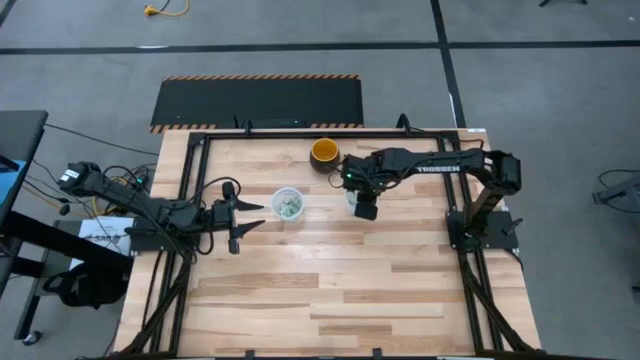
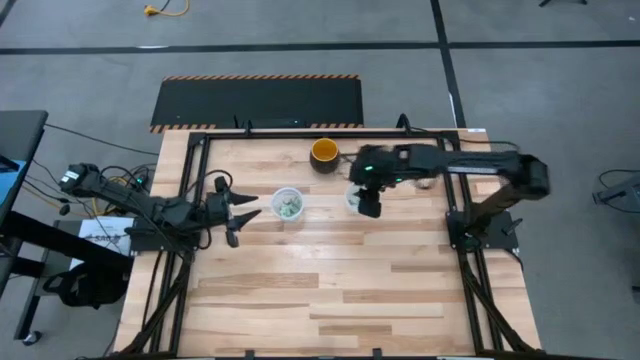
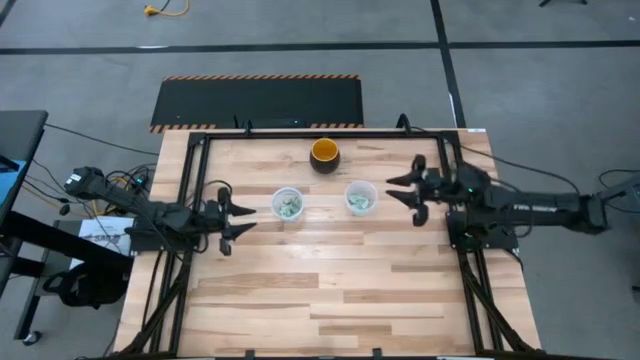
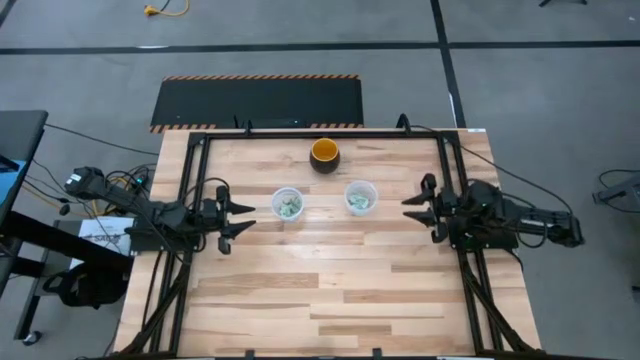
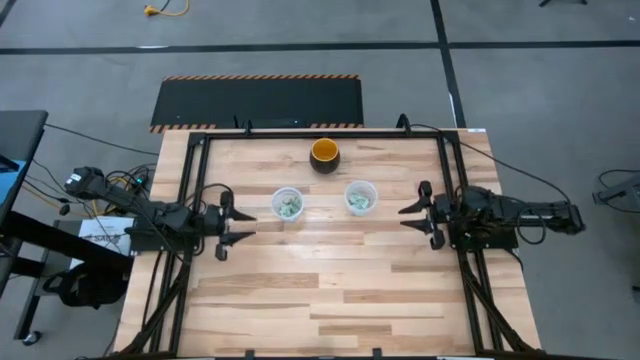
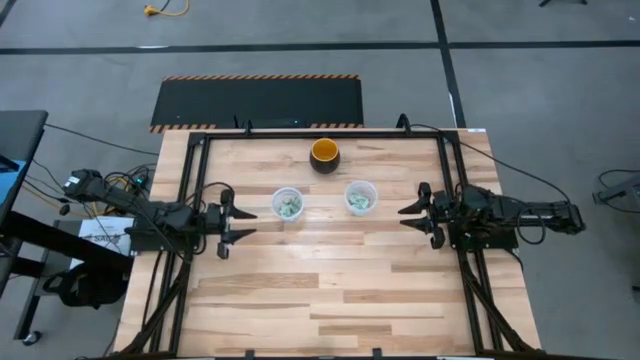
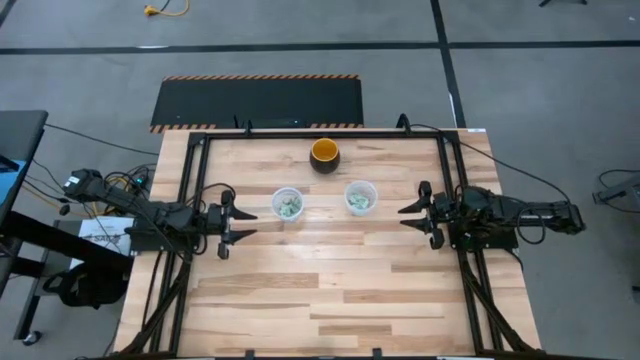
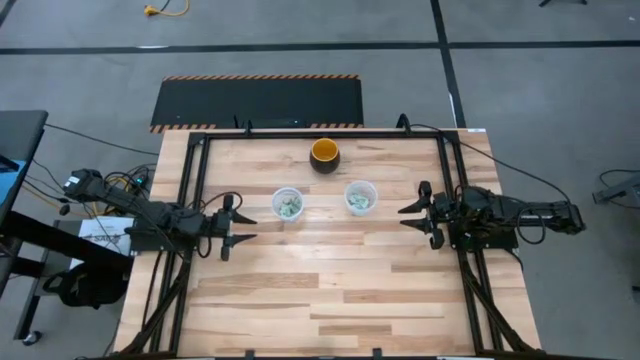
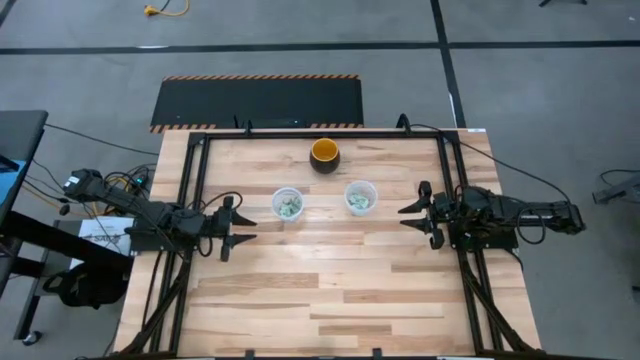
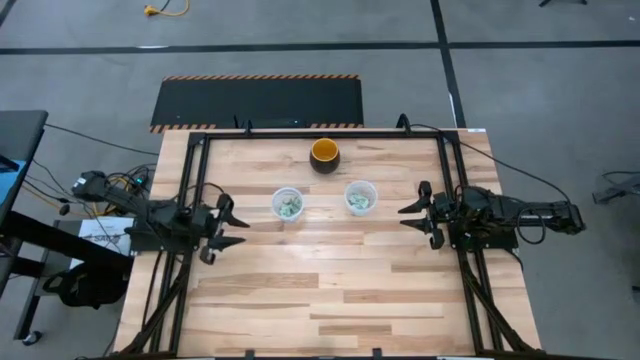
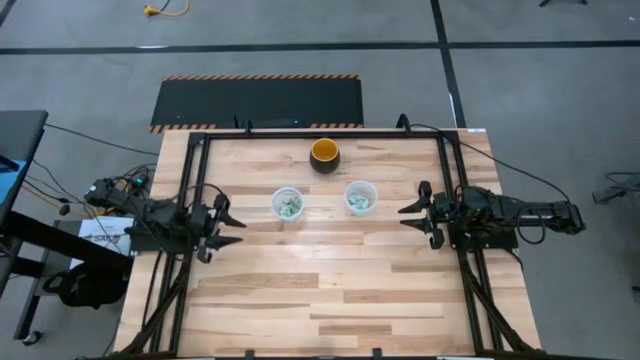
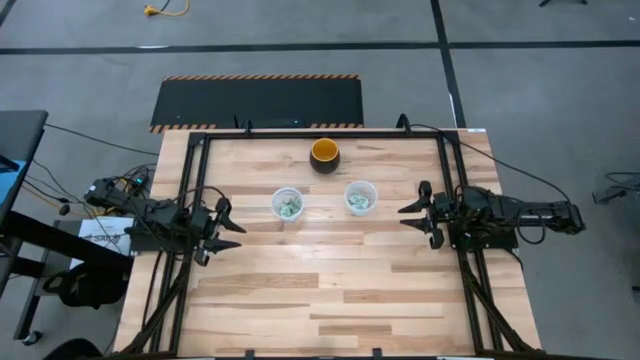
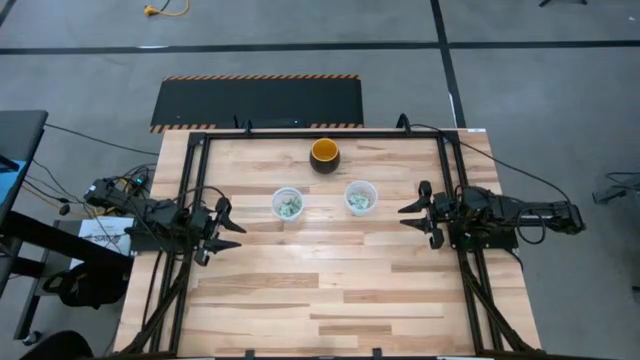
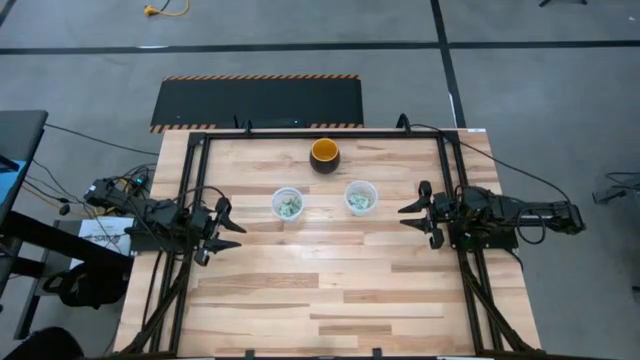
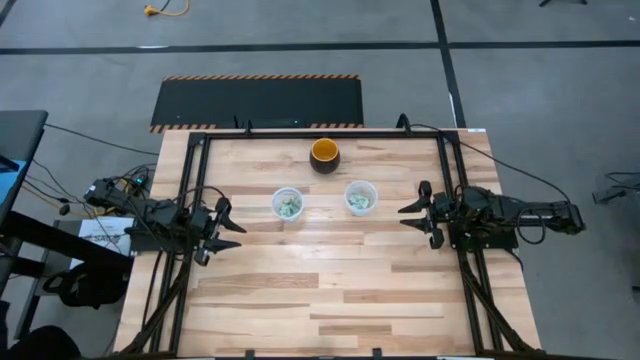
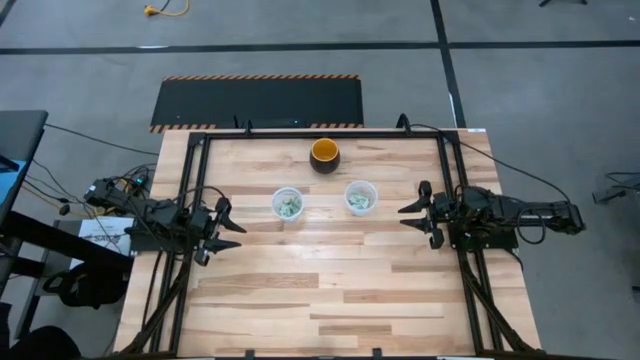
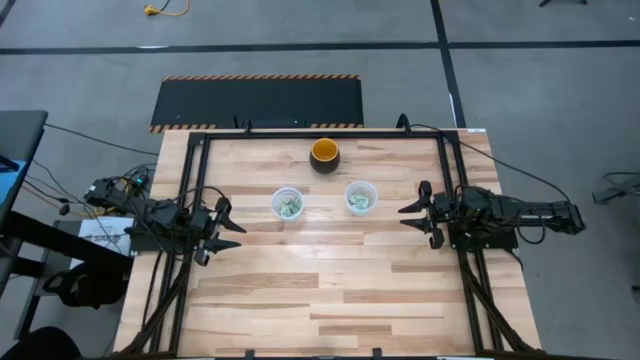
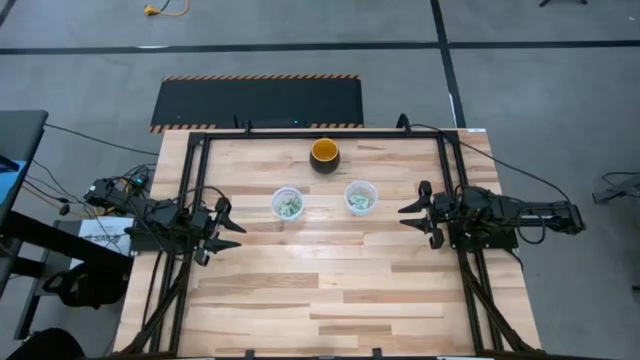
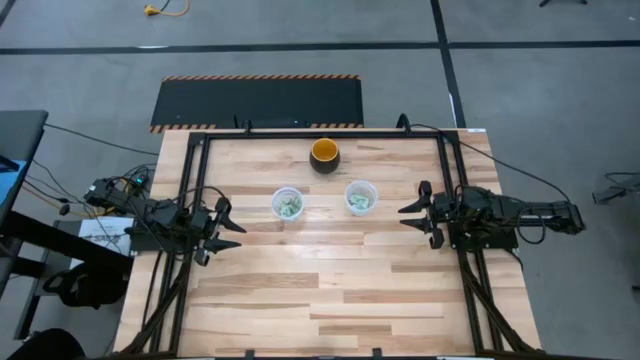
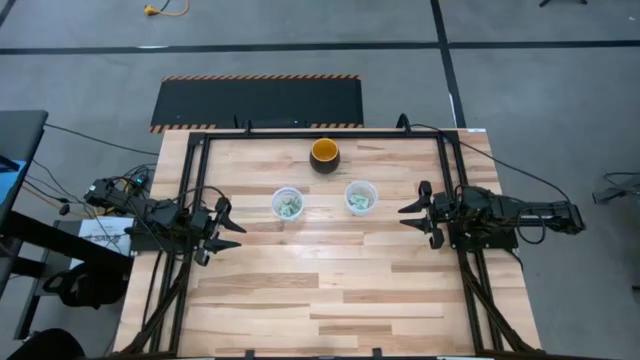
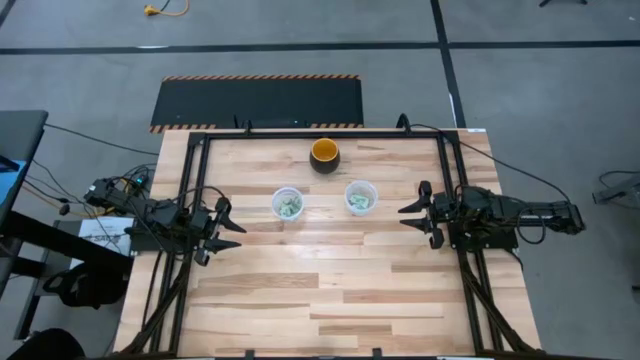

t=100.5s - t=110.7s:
Task: Pick and place Stevia / Truvia into bins
Return to Home Position

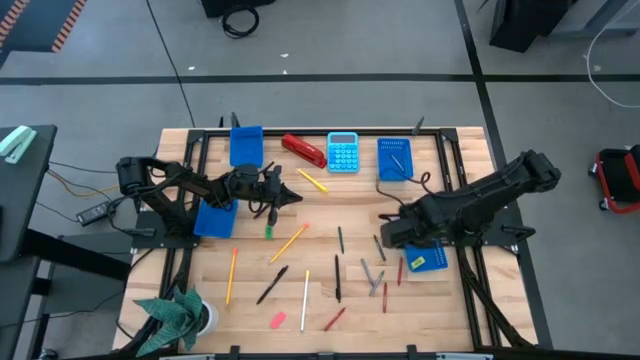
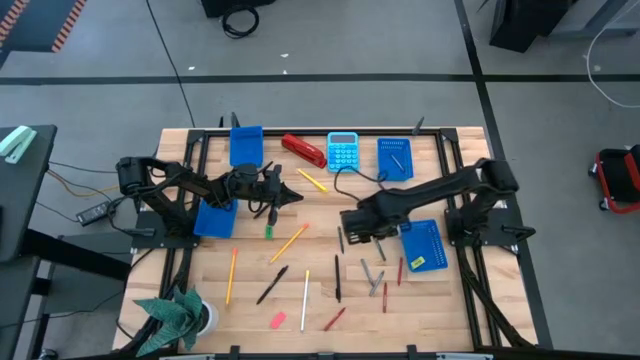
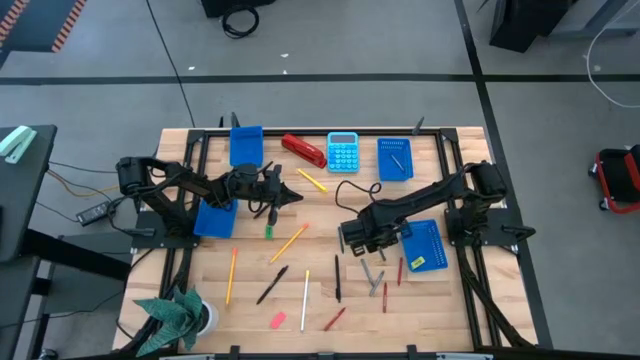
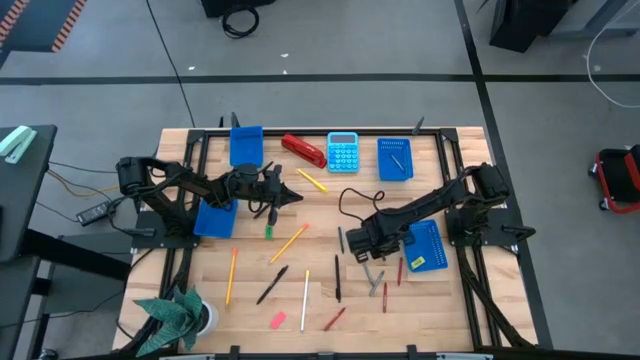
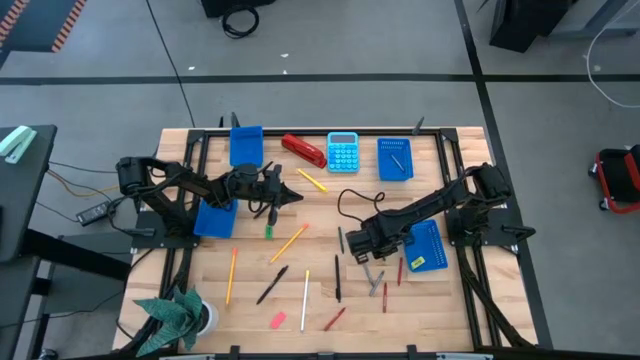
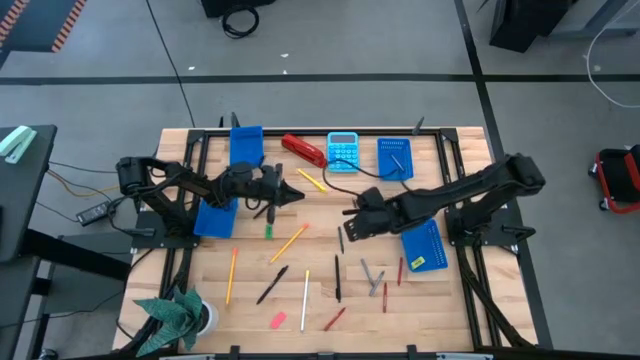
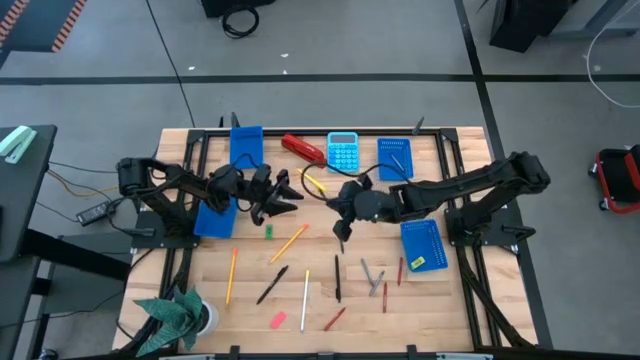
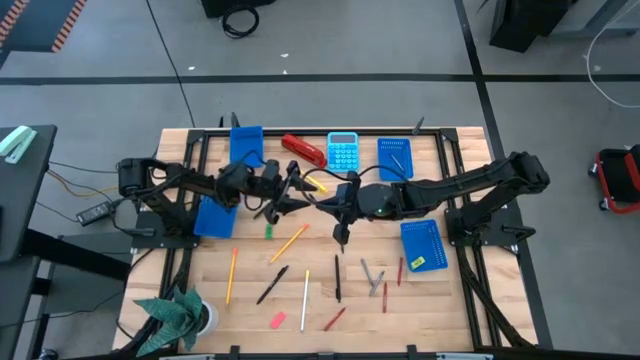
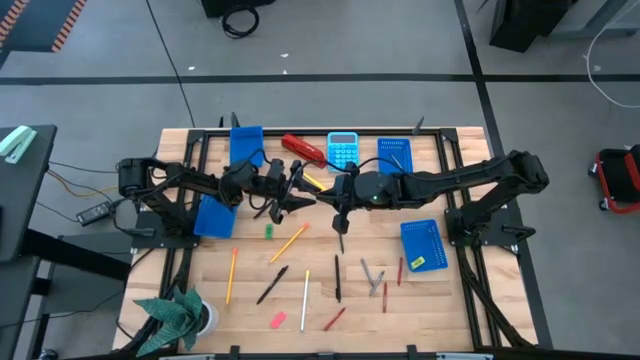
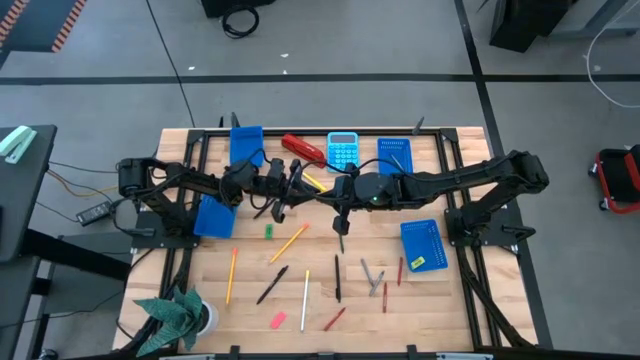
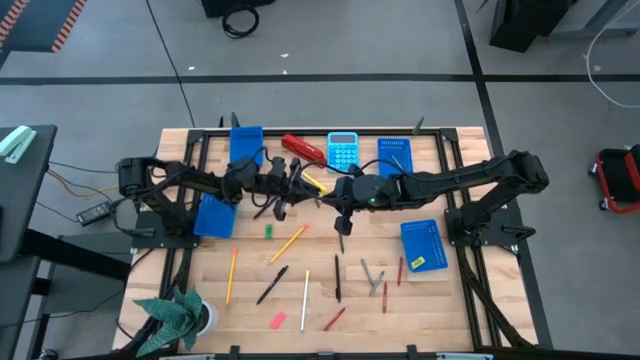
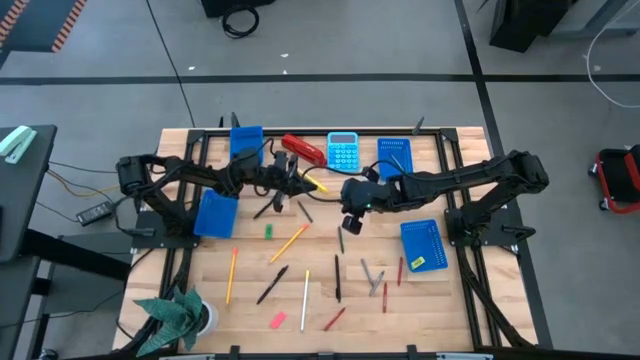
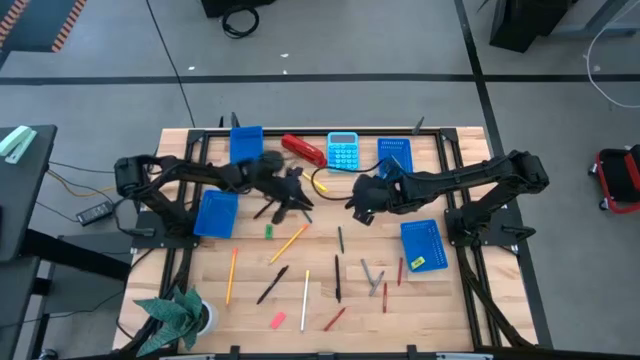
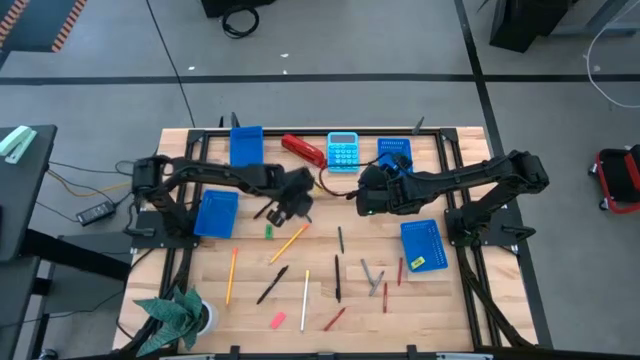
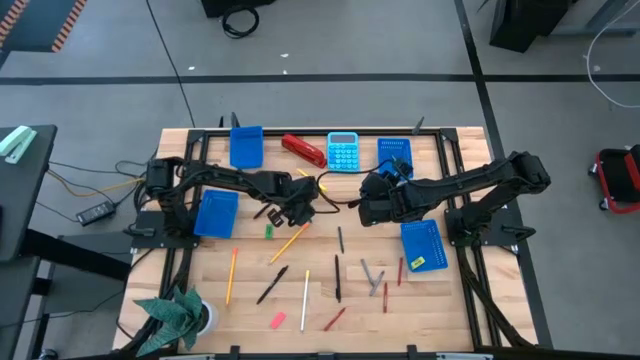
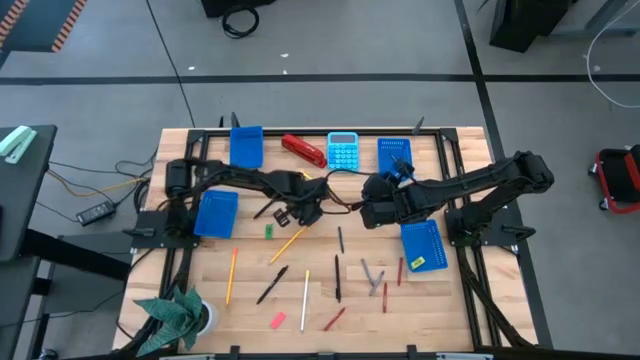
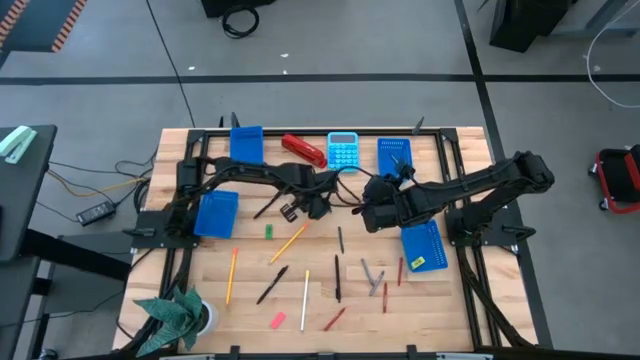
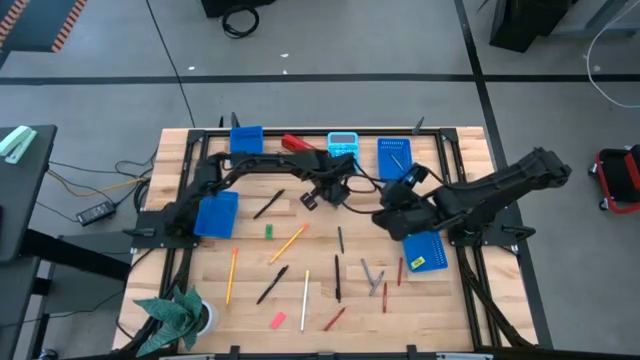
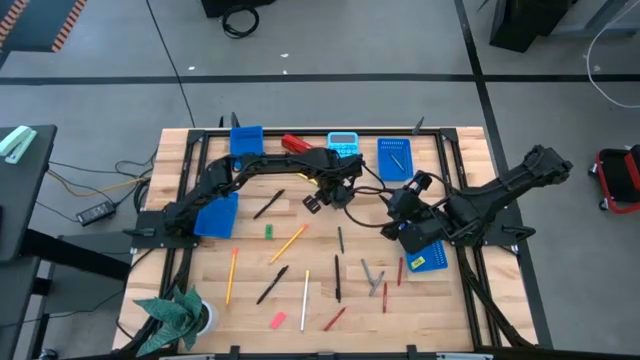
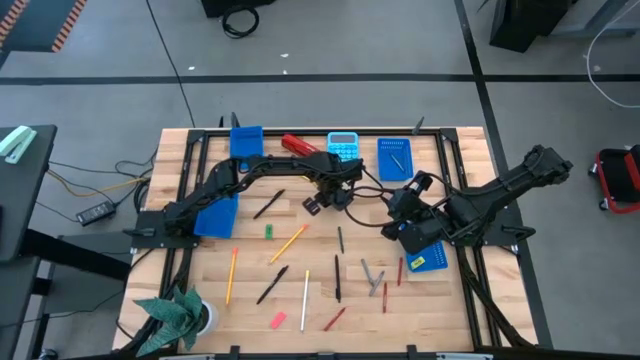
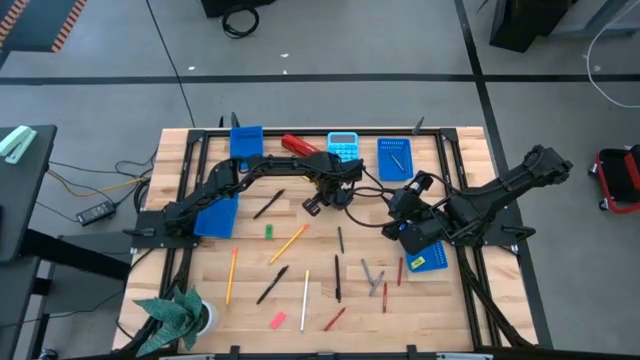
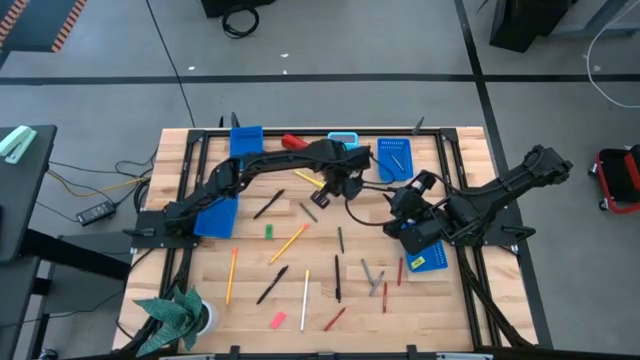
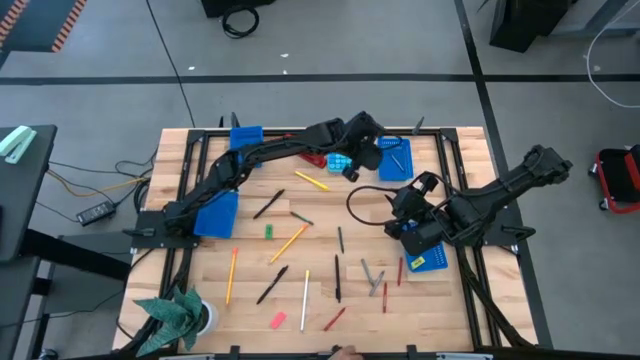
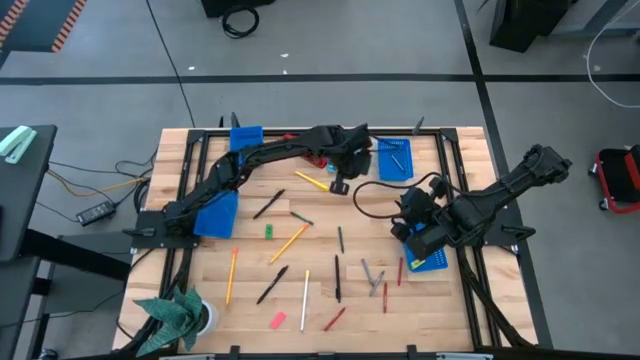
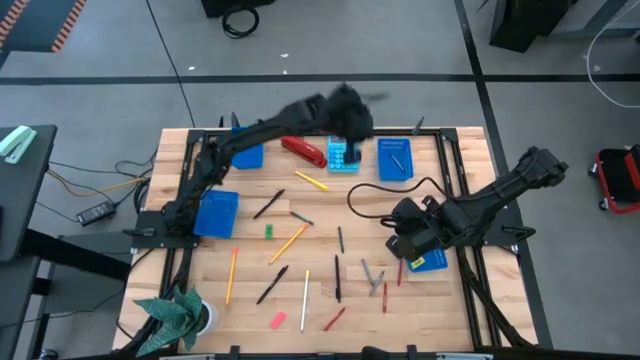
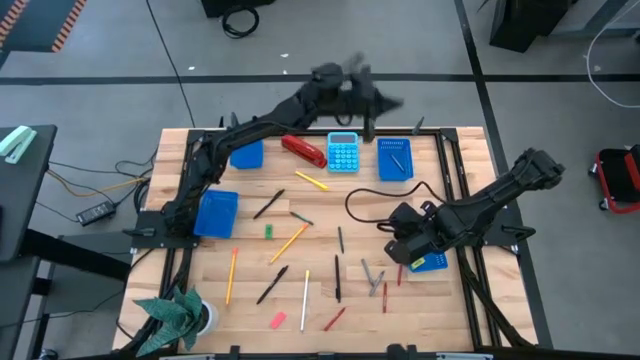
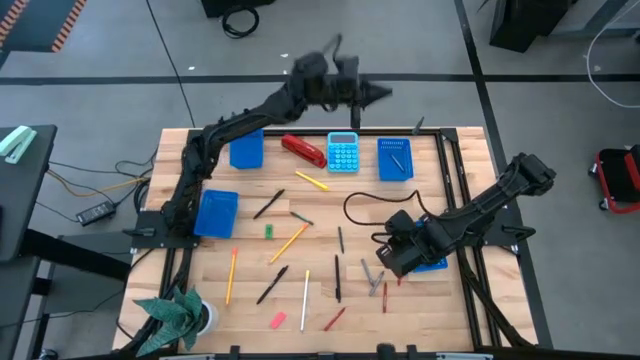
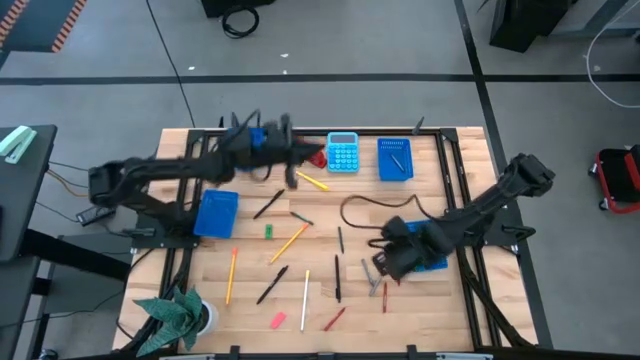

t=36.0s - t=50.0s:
Task: Sort crayons/erasers/pens/pencils in bins
Put the green crayon into the top right bin
